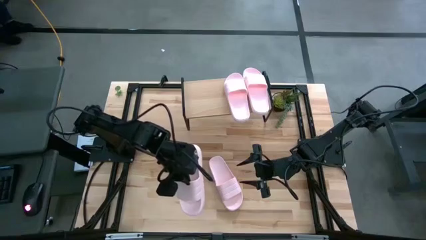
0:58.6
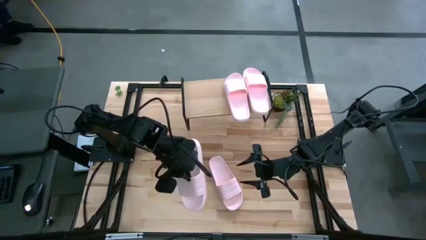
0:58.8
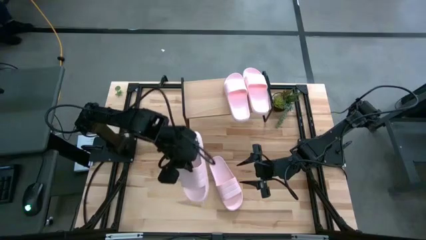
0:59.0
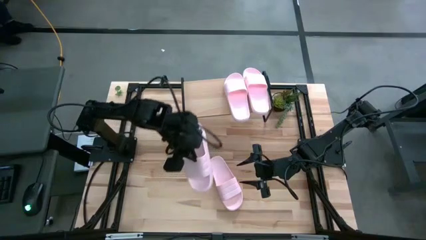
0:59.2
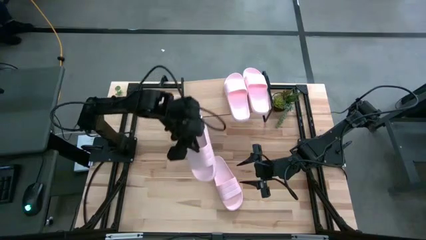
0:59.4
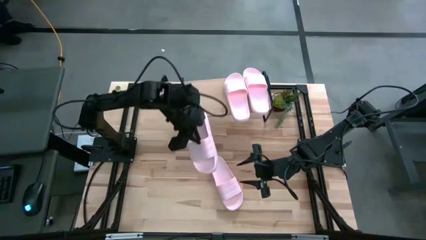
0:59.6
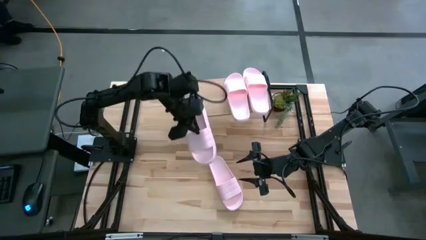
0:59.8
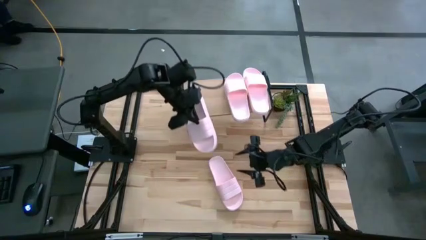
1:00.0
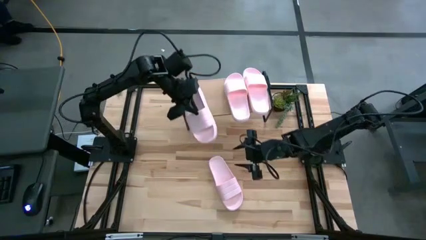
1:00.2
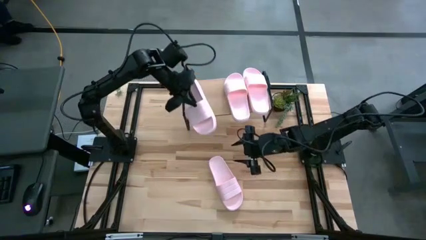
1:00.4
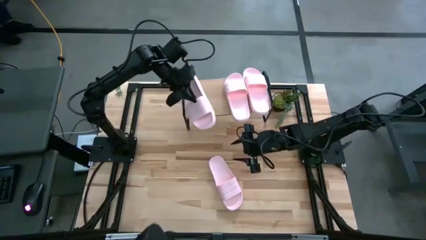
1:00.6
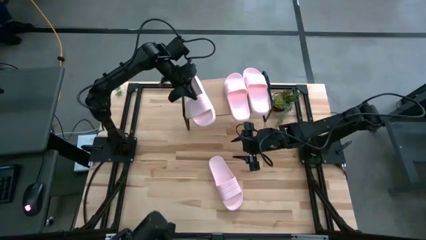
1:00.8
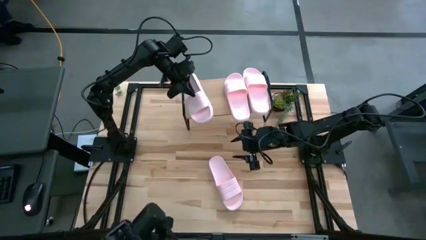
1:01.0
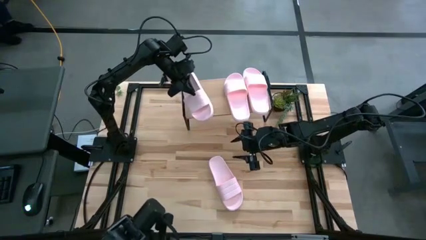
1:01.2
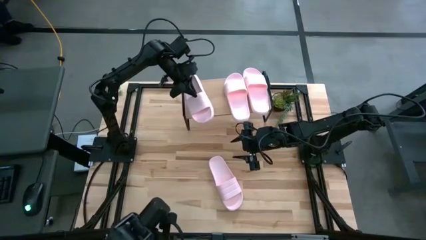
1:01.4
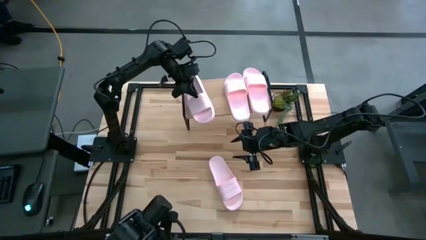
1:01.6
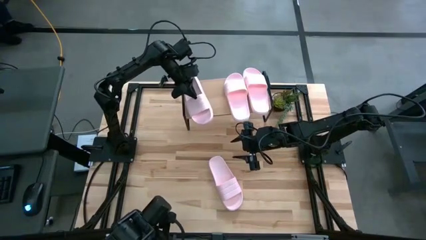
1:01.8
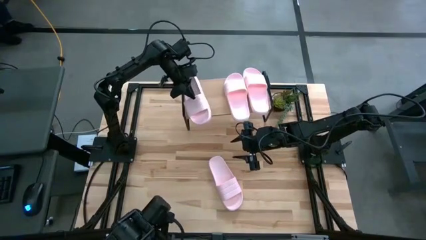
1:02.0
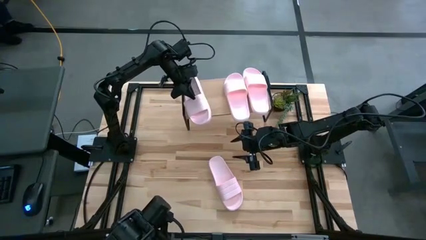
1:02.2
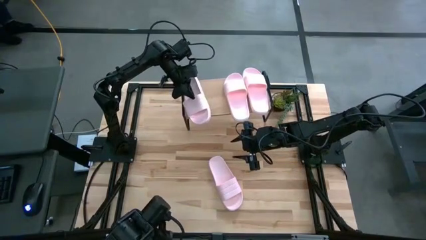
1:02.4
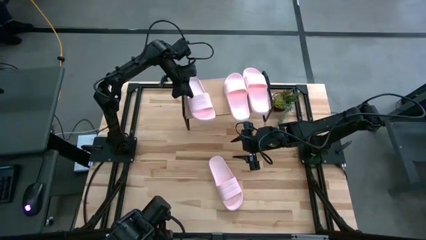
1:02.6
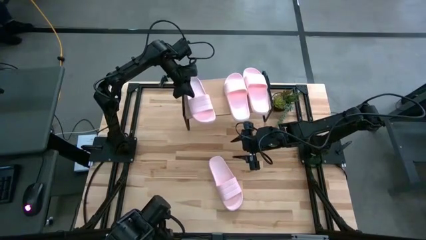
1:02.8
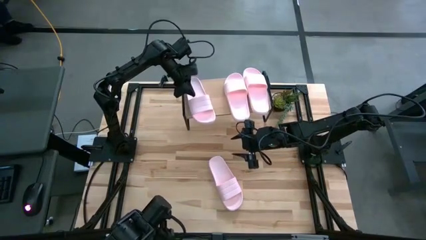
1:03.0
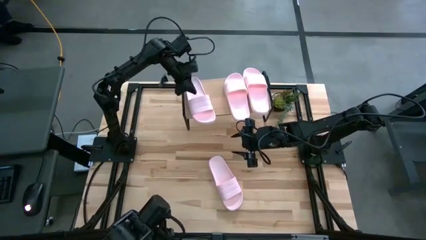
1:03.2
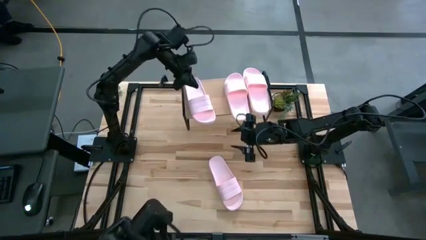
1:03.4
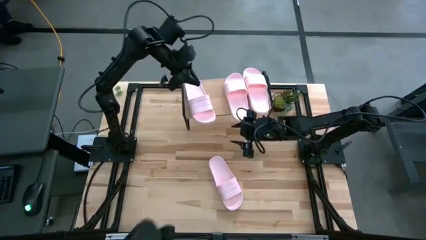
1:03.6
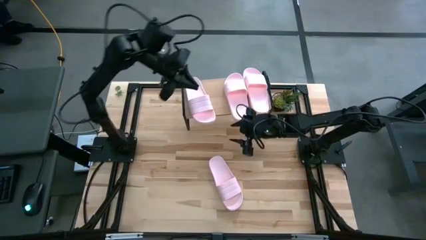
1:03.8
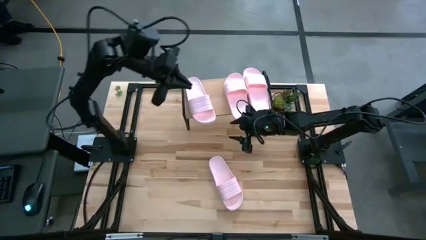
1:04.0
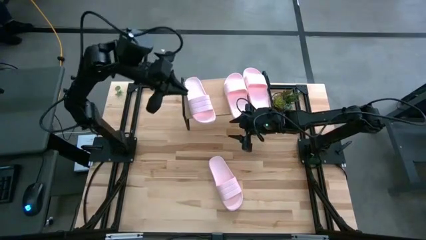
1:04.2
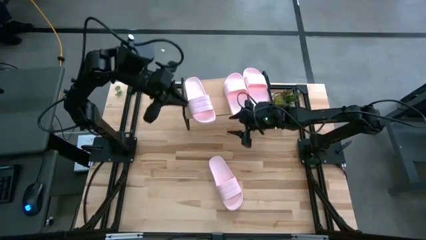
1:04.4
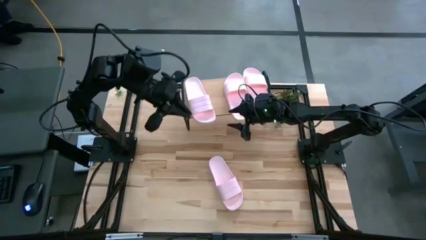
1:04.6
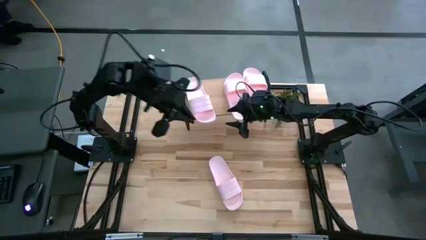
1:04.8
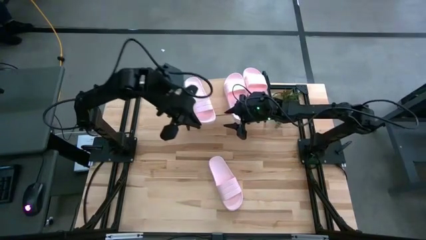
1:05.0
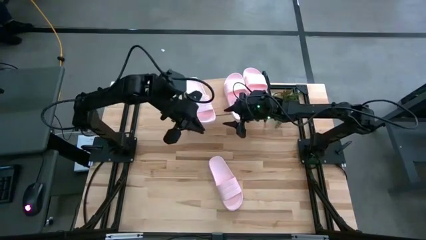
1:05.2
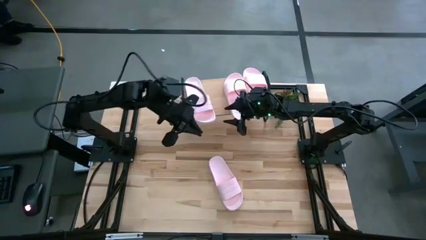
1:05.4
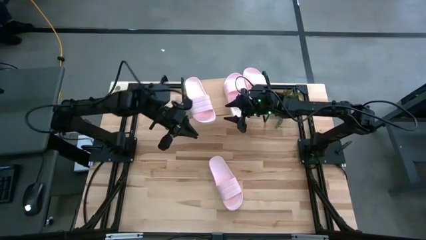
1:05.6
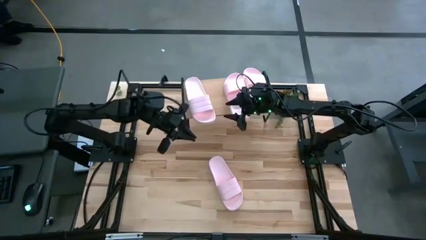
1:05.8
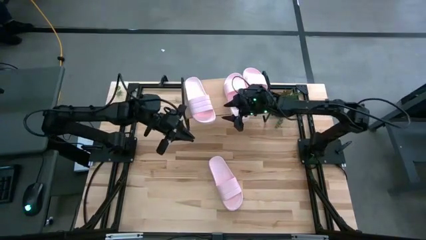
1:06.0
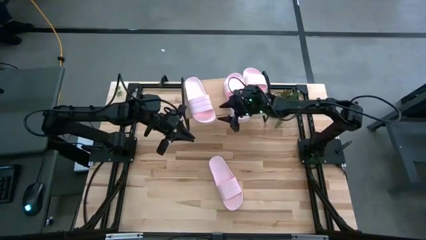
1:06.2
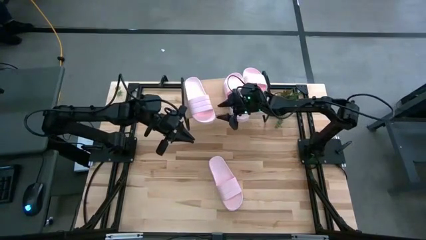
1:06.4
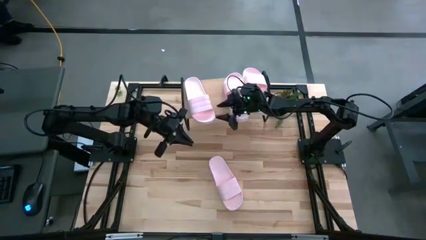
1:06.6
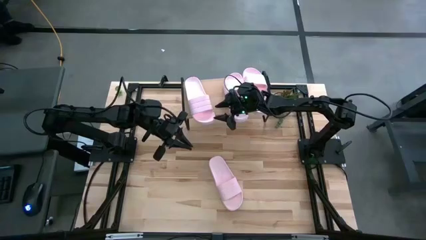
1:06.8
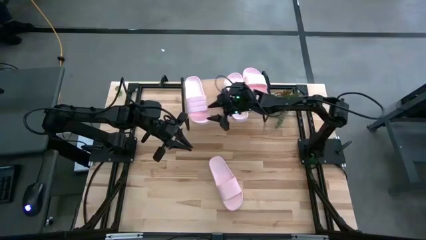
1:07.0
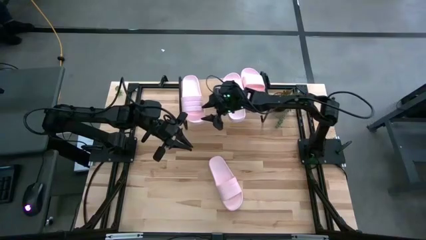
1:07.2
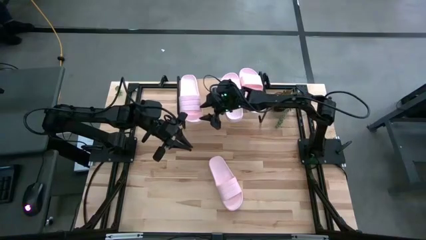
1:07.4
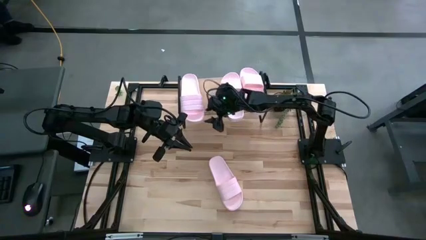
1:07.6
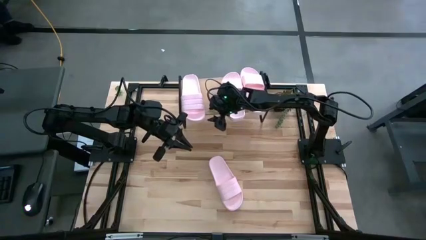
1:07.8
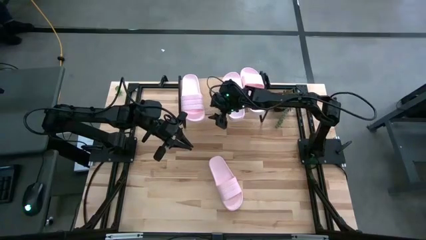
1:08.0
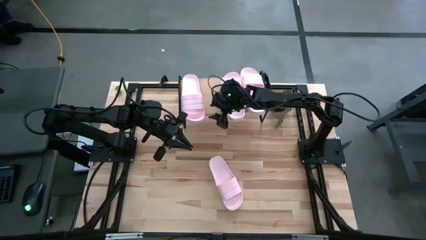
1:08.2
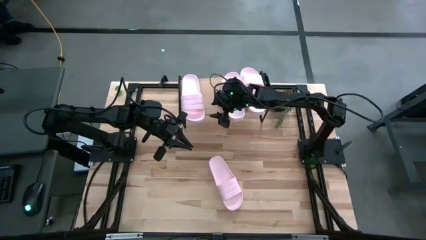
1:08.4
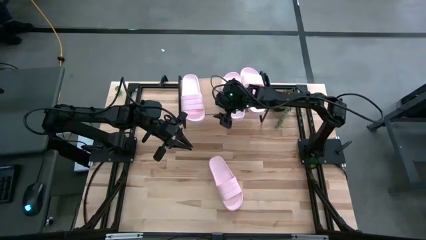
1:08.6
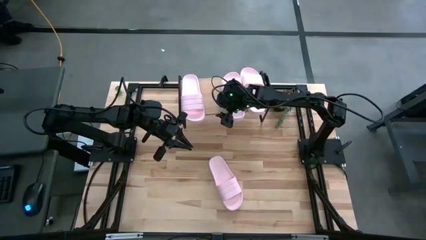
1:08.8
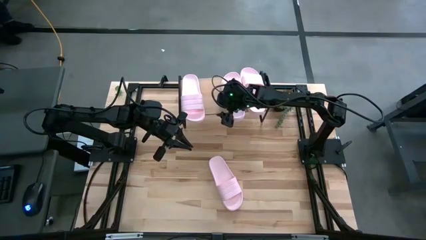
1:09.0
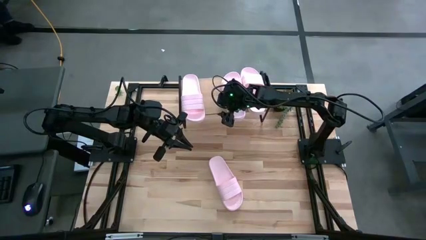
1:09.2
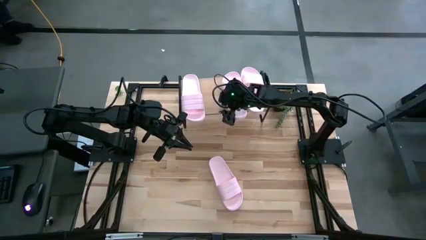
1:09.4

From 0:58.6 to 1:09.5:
Task: Pick and place slides into the shelf
Put the pink slipper on the shelf
